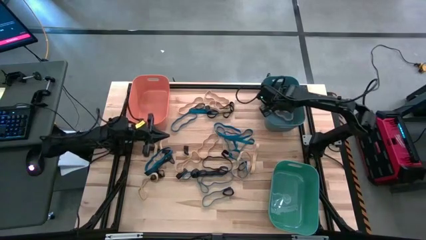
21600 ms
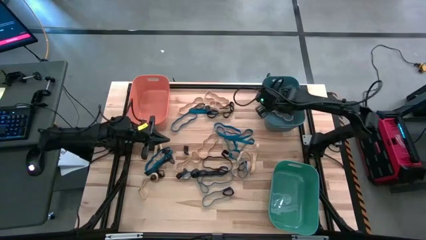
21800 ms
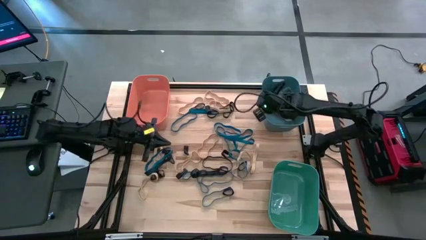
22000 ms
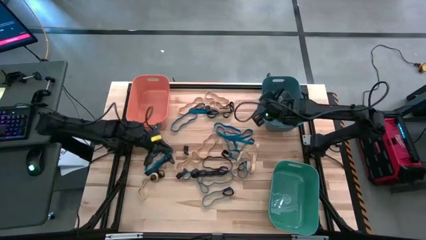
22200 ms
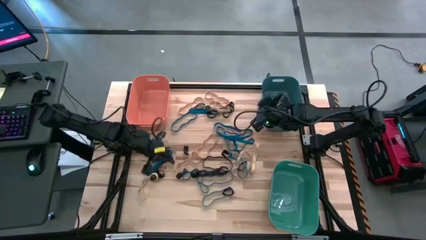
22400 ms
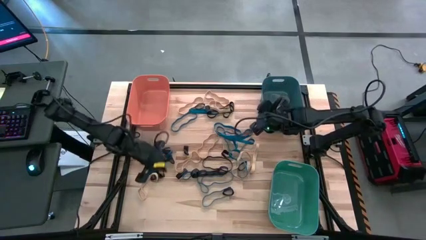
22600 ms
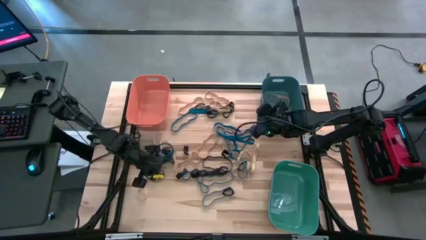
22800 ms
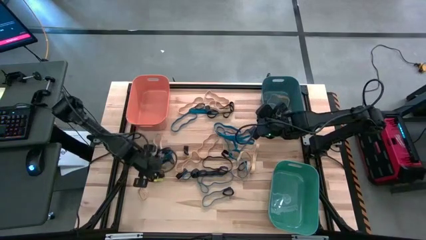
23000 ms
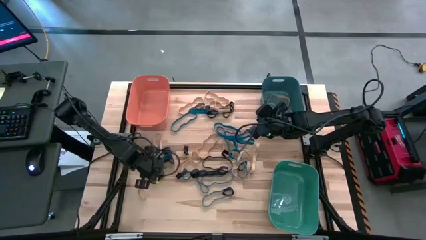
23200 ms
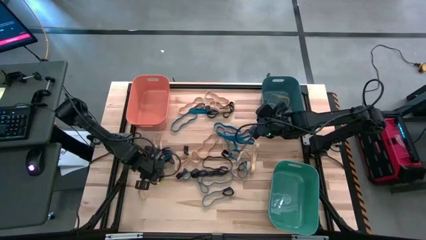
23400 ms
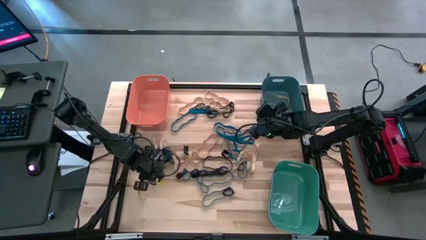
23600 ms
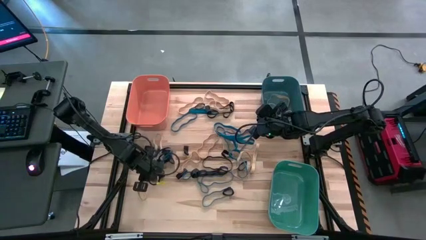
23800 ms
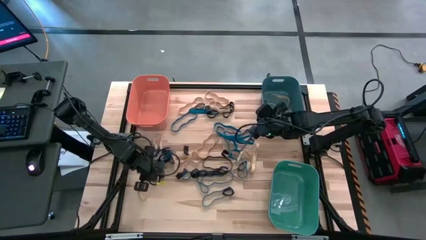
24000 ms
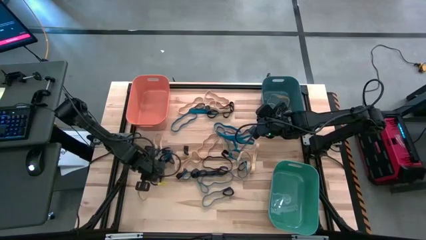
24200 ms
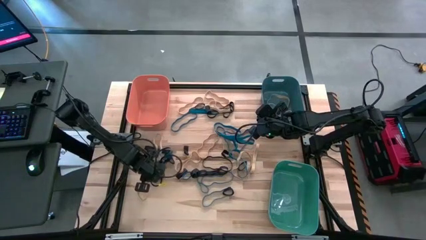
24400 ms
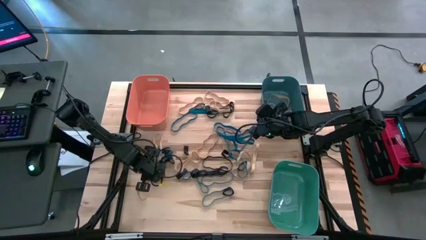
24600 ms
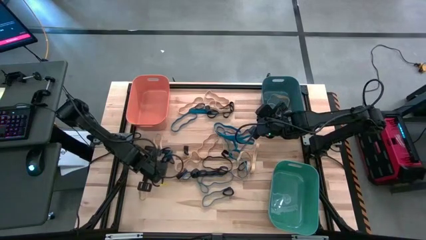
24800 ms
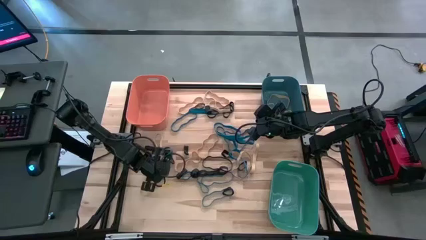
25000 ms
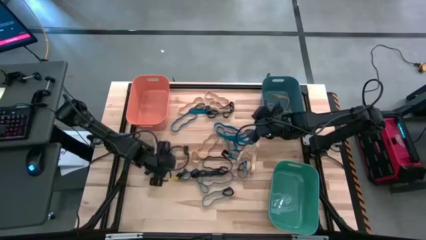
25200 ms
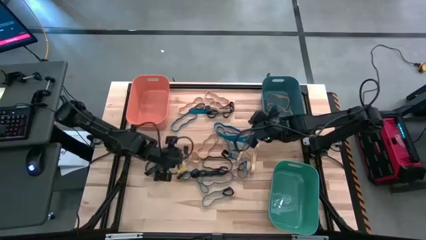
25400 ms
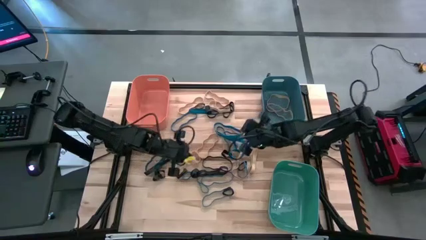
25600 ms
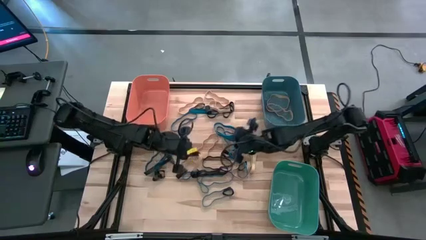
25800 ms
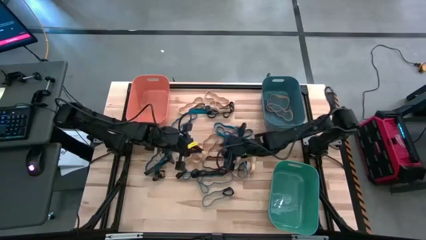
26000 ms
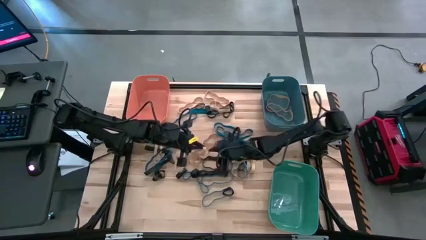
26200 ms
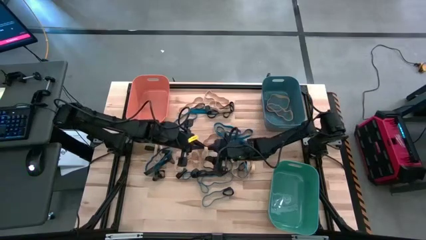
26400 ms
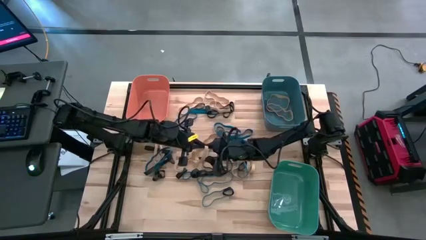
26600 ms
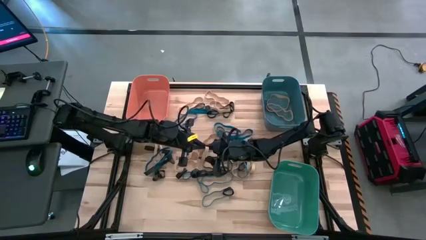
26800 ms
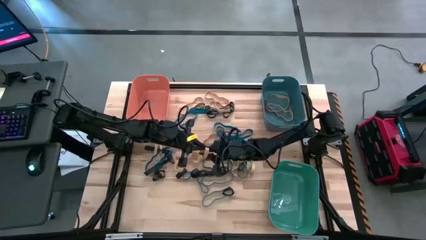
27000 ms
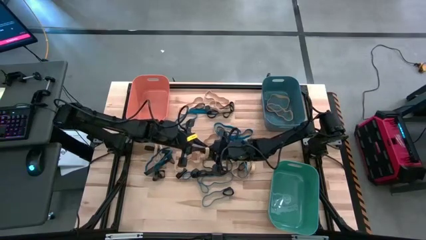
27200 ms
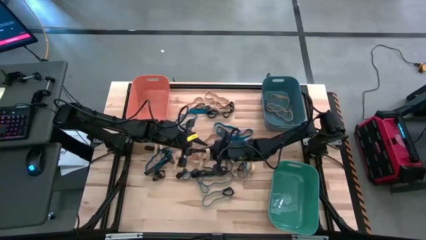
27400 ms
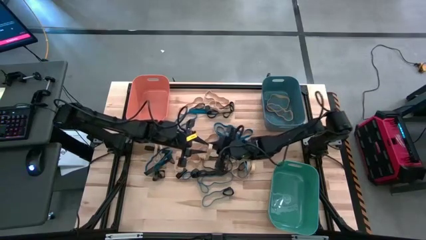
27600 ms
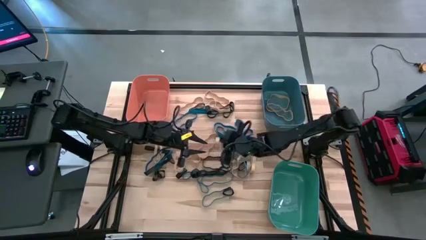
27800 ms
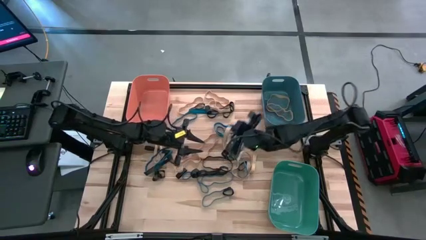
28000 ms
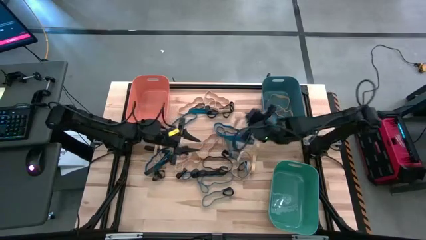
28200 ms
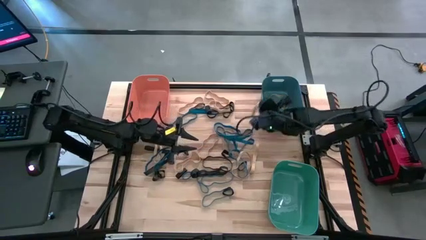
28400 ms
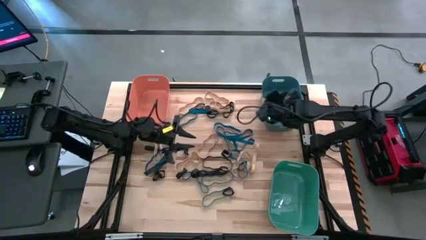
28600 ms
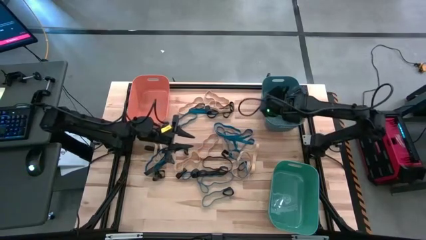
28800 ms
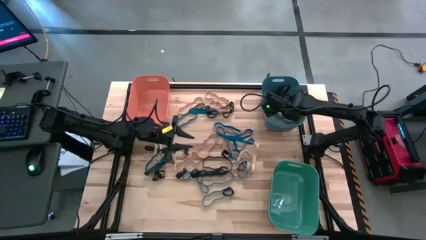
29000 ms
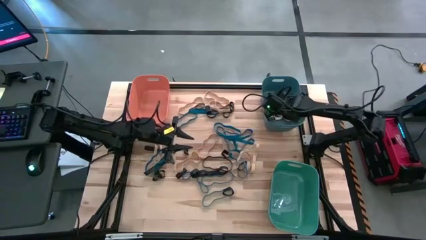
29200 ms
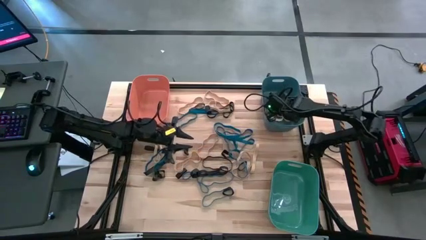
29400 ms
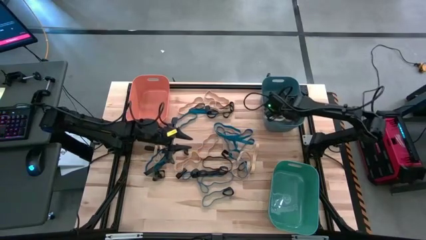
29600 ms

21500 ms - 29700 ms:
Task: Sort rubber bands into baskets
Put the white rubber band into the blue bin

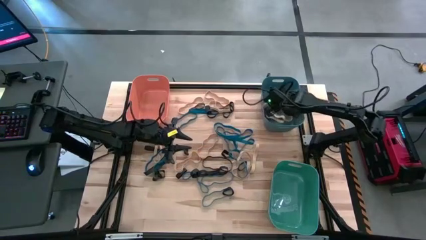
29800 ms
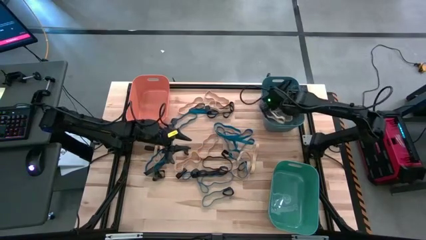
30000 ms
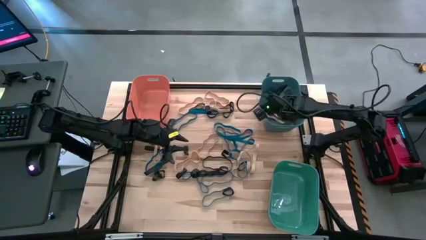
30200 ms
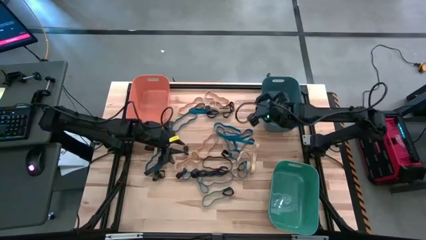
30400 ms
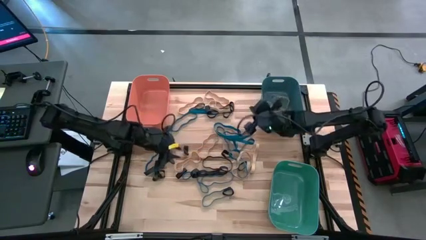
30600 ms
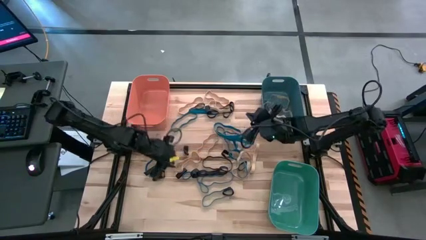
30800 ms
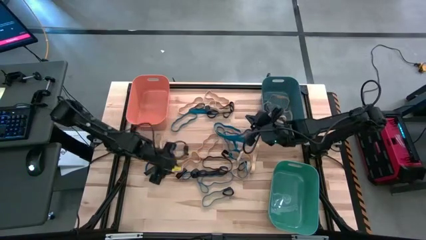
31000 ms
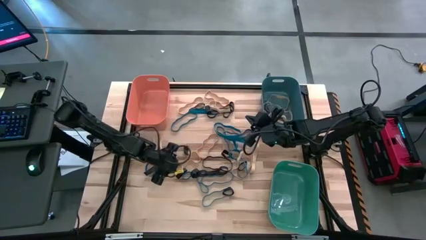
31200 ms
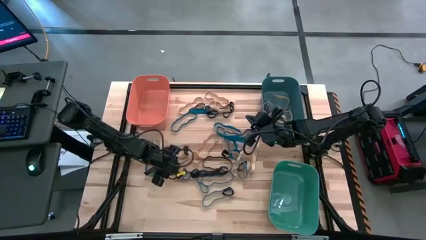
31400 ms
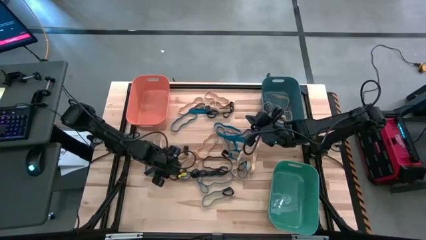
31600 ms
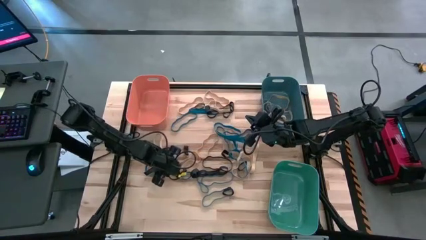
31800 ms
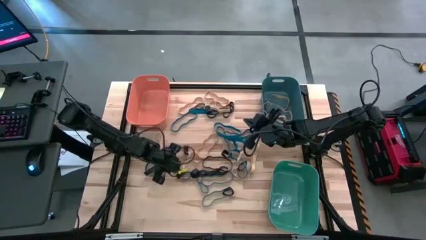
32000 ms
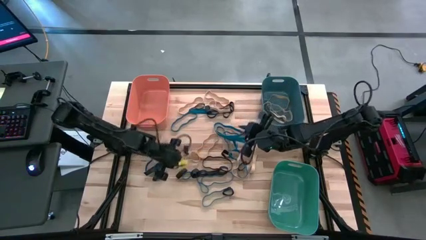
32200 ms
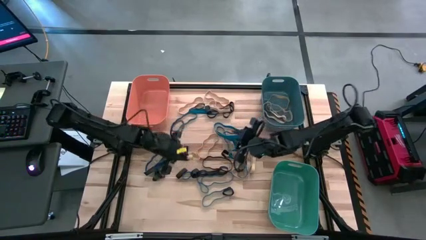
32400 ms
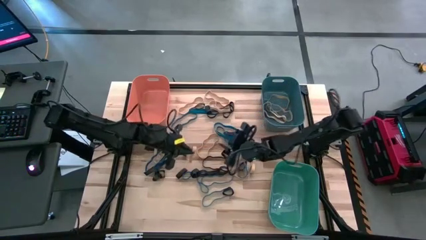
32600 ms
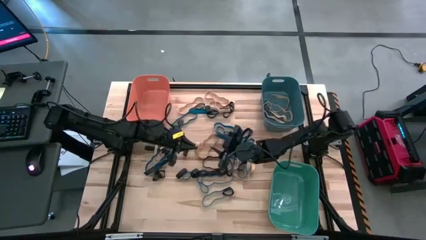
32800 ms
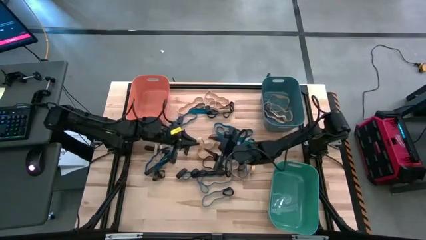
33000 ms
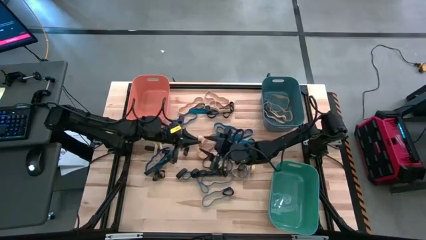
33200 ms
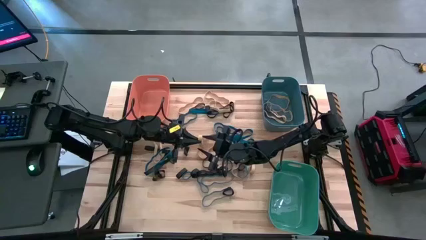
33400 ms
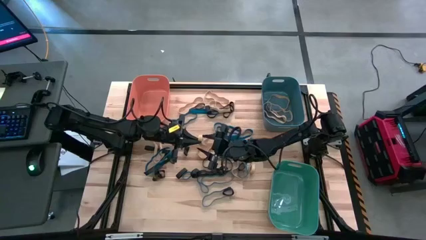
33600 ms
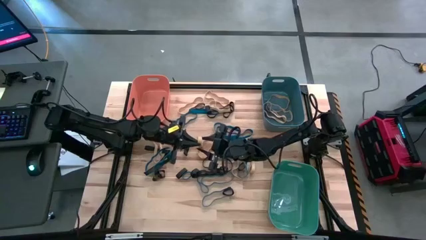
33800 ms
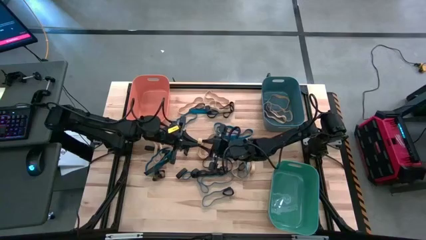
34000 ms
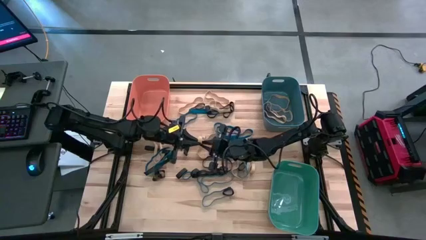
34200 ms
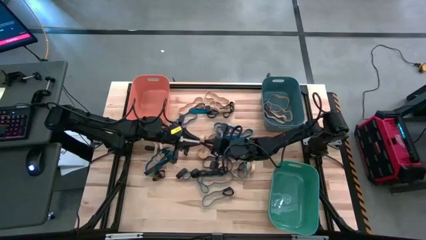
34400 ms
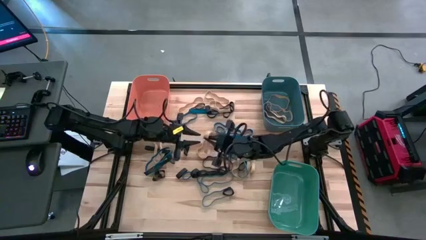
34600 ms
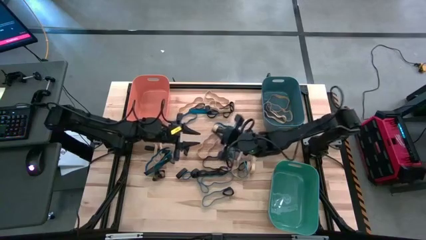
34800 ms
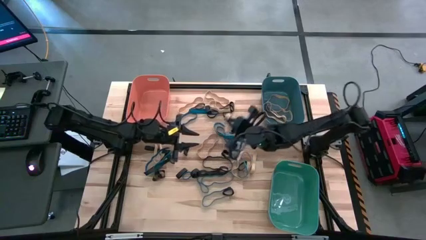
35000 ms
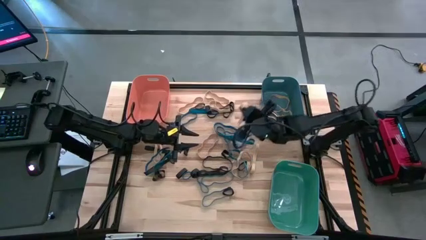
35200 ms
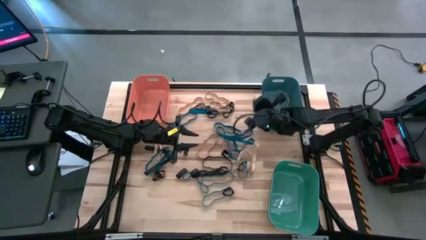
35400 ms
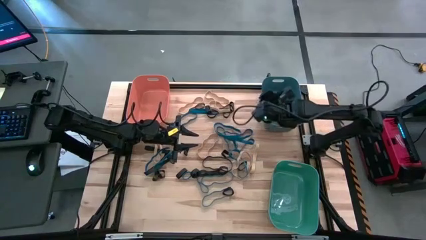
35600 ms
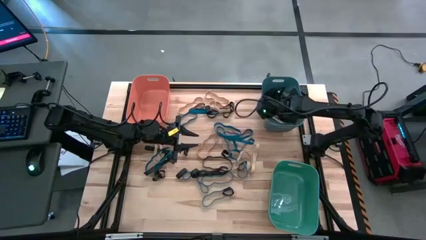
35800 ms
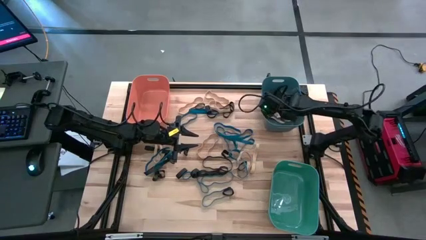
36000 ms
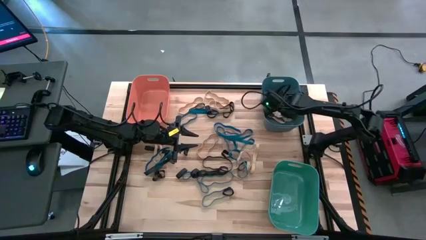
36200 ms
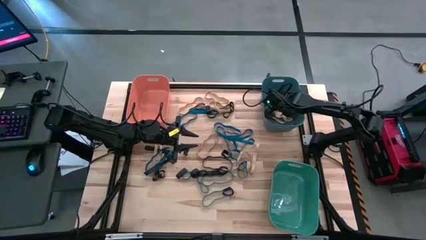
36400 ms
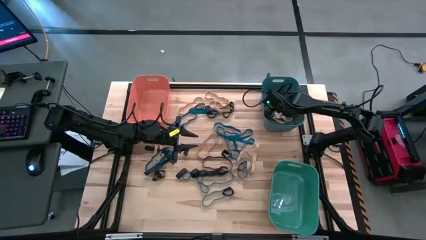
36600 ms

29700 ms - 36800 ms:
Put the white rubber band into the blue bin
